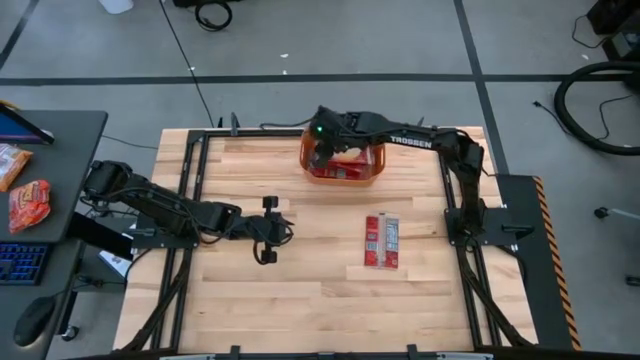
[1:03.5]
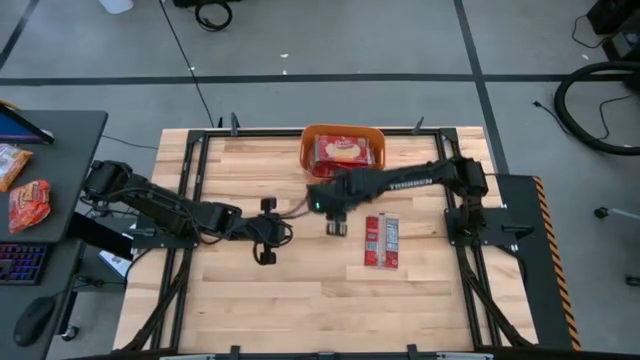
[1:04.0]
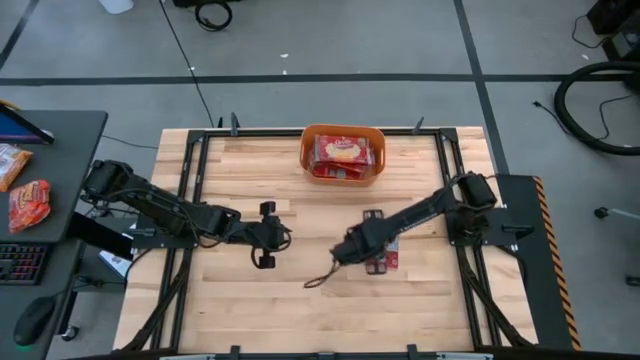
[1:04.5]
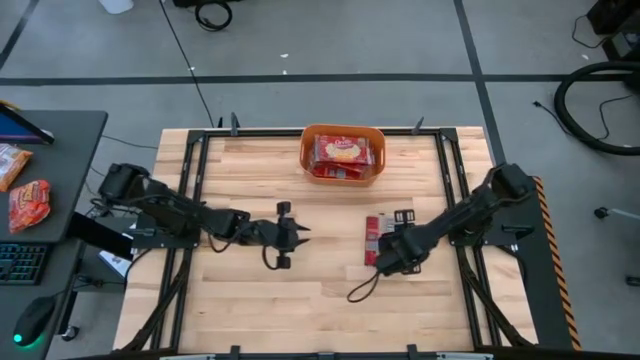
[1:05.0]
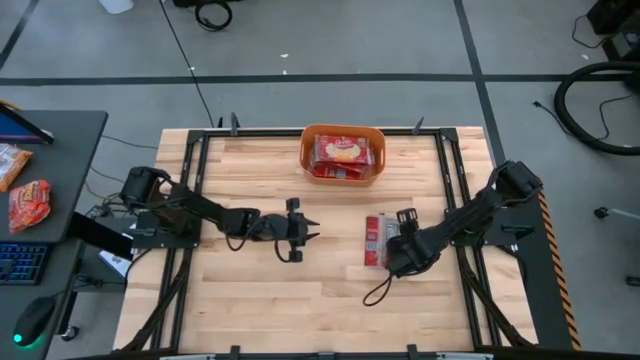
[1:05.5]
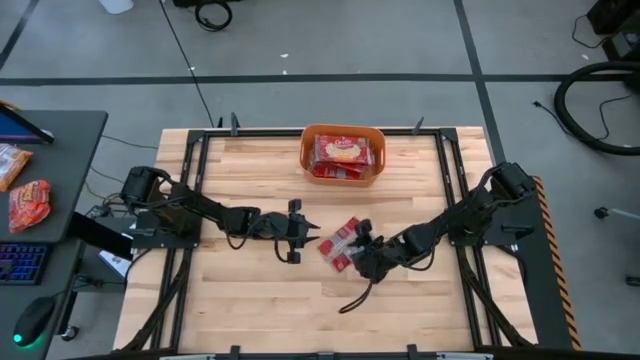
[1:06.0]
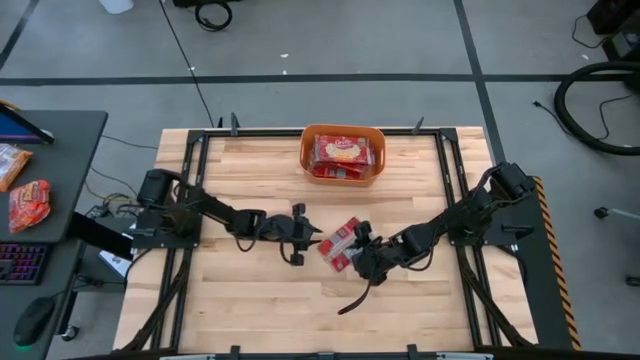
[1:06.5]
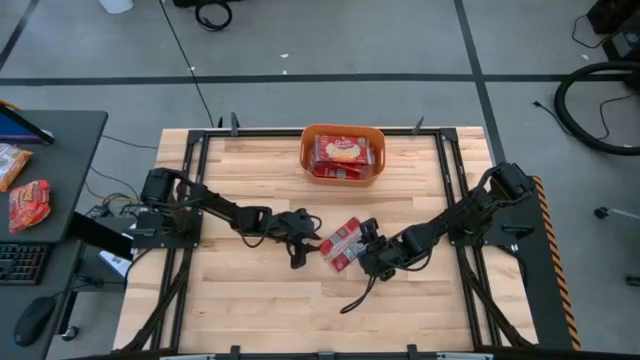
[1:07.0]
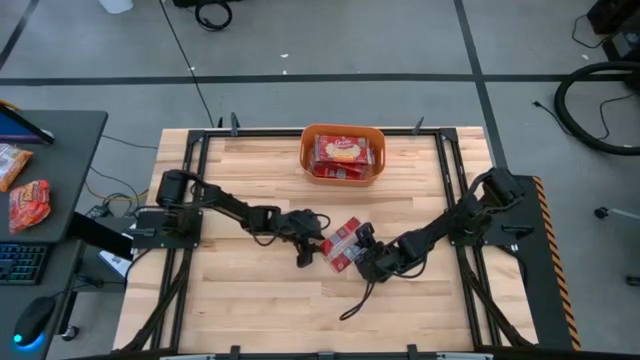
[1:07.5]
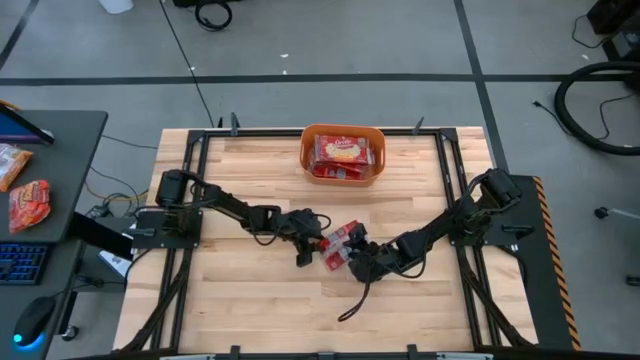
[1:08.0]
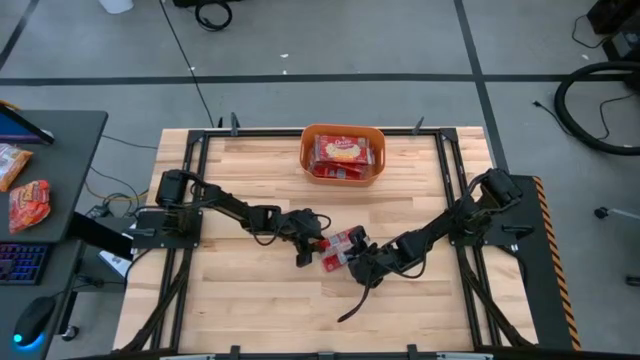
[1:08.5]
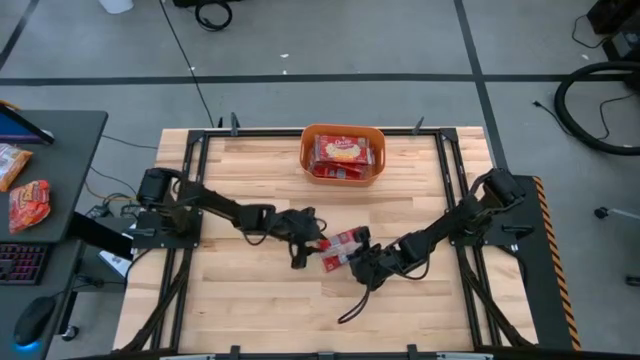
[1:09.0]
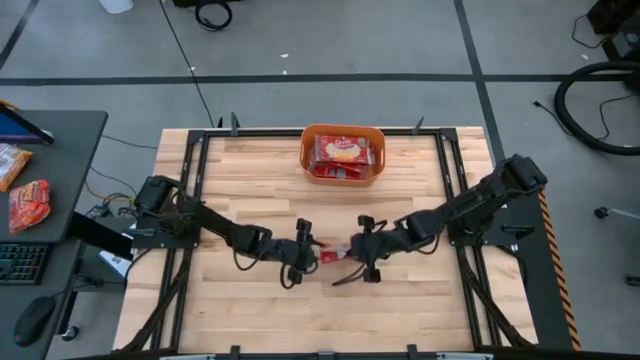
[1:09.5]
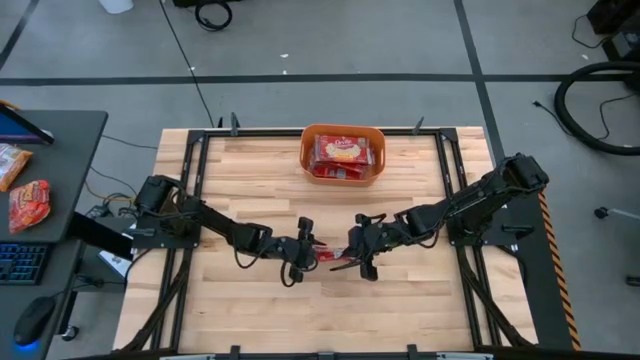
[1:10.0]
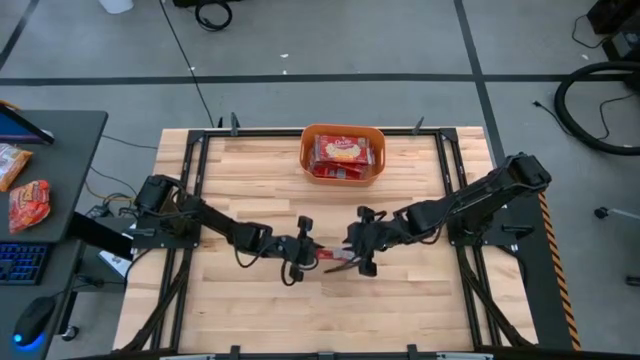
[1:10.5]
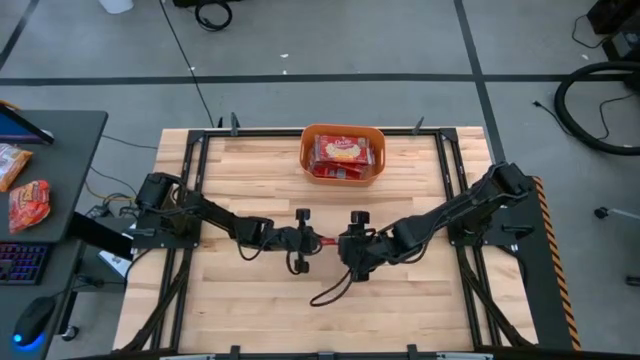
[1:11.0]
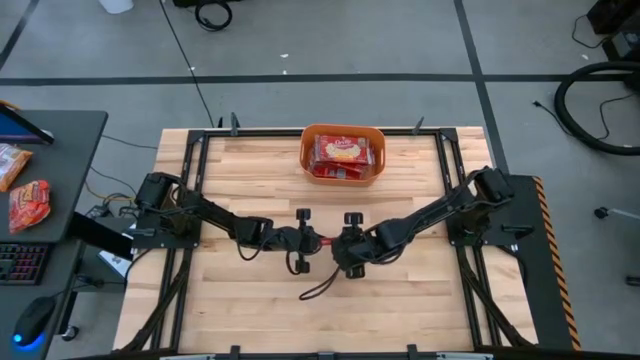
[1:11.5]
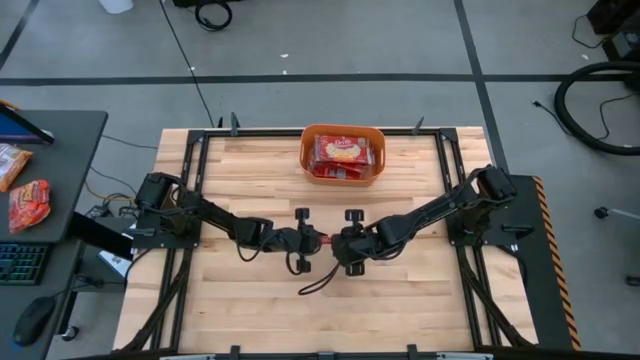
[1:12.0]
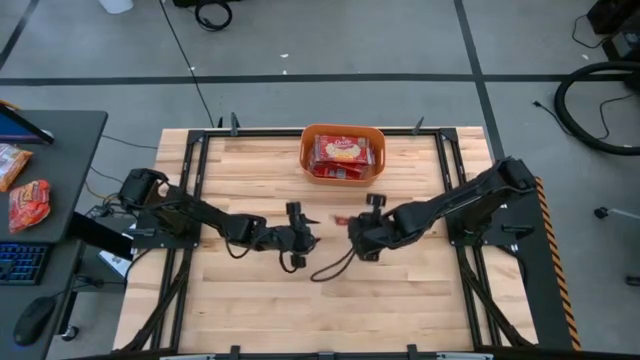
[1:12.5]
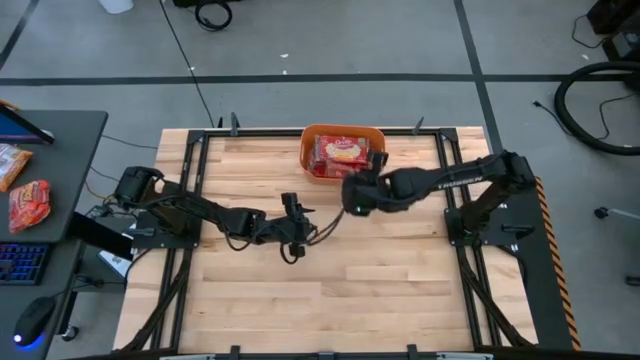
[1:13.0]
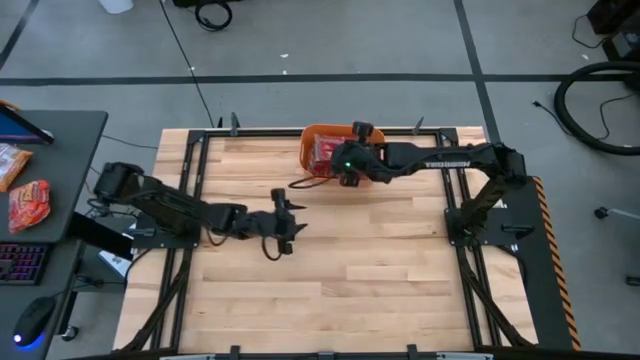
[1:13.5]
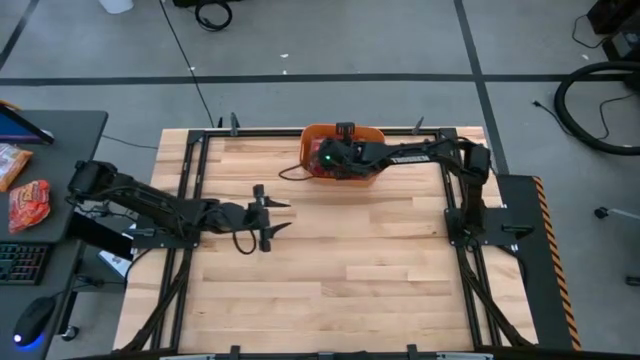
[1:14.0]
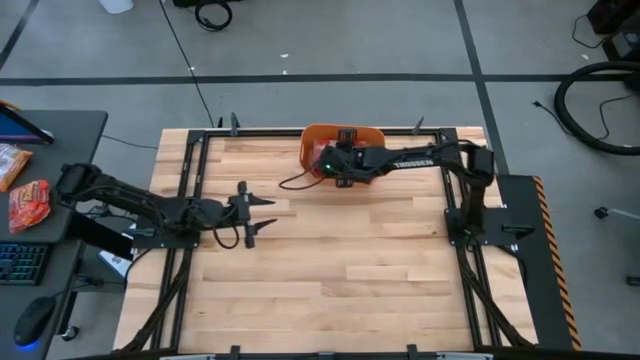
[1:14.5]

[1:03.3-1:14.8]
Task: Sort popcorn bags into baskets
Put the red popcorn bag into the orange bin

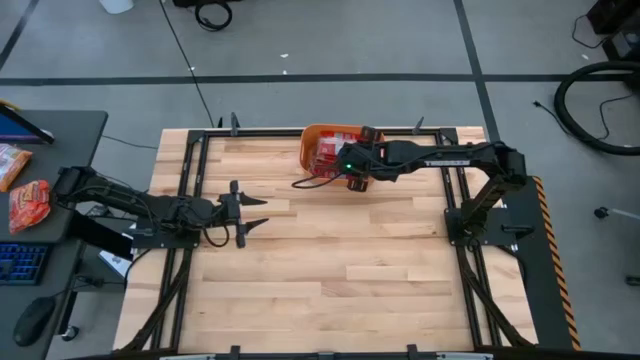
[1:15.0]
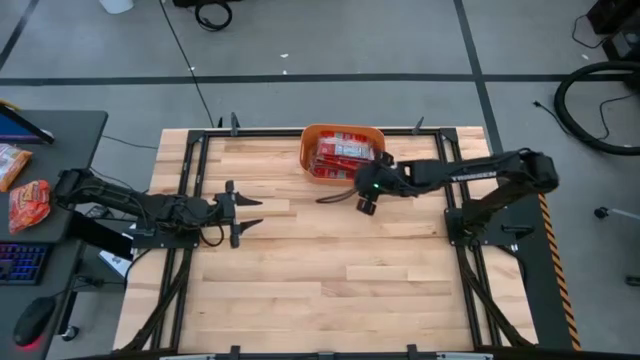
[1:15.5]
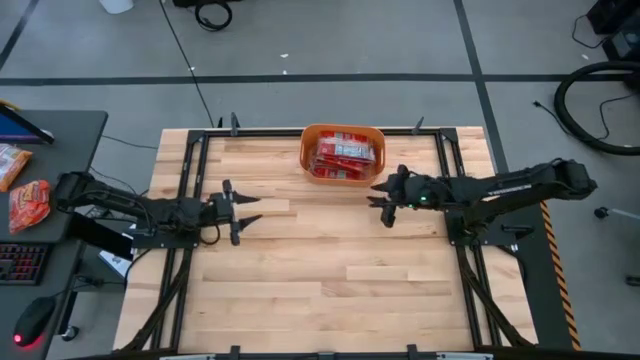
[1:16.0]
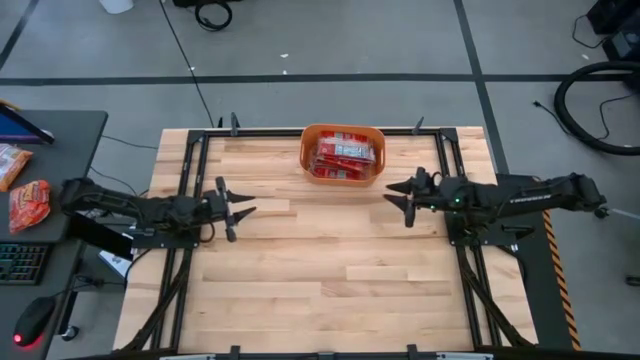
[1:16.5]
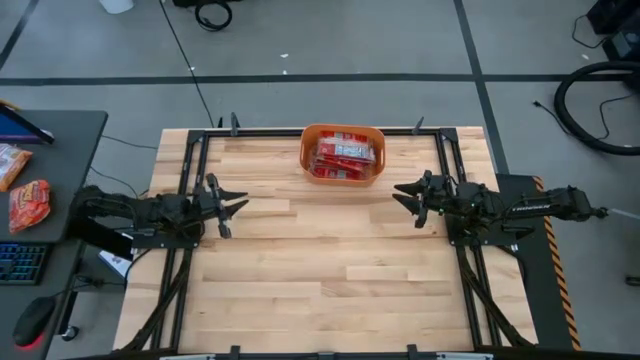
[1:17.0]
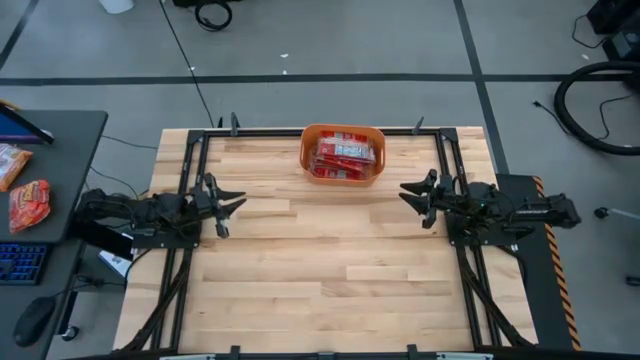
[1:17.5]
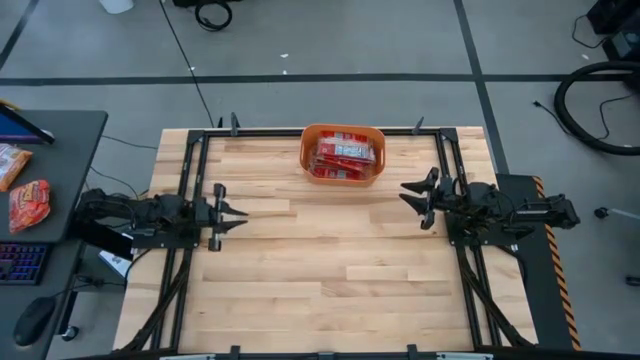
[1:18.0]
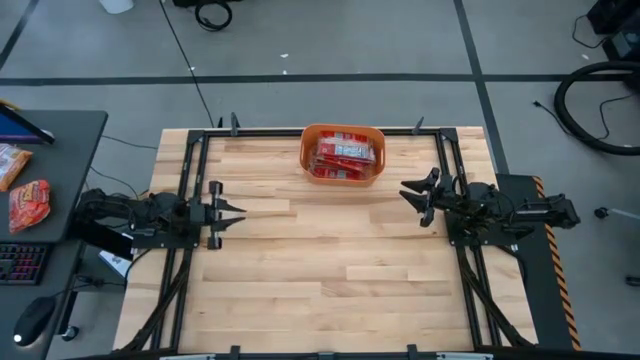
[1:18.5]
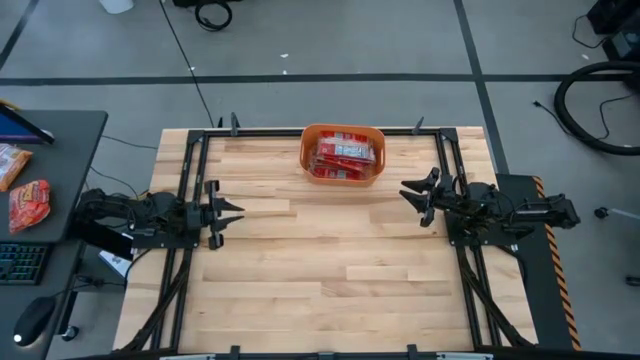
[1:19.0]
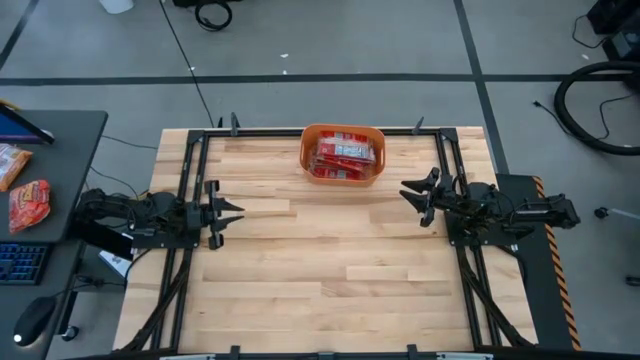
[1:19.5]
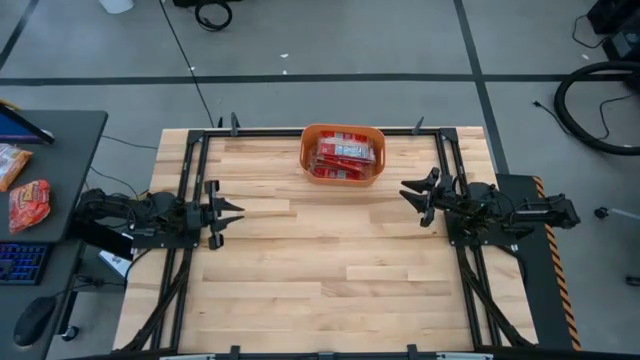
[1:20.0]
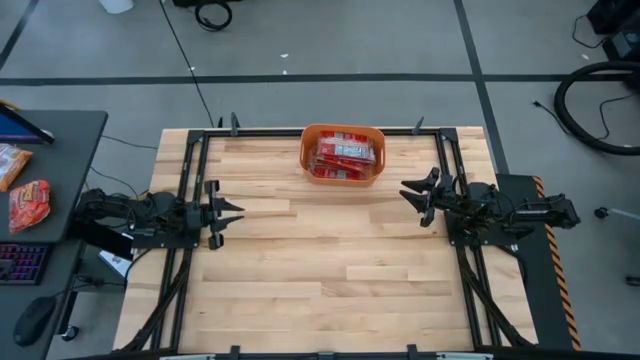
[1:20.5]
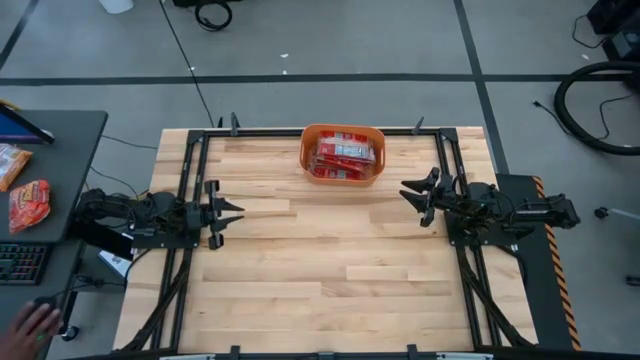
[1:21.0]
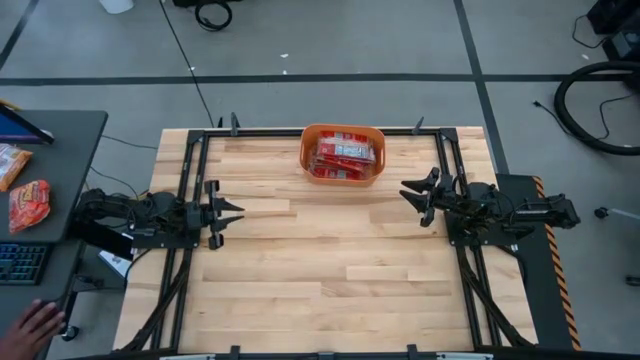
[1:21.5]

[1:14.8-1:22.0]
Return to Home Position

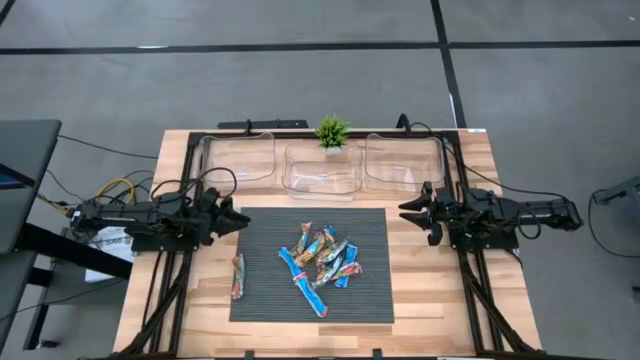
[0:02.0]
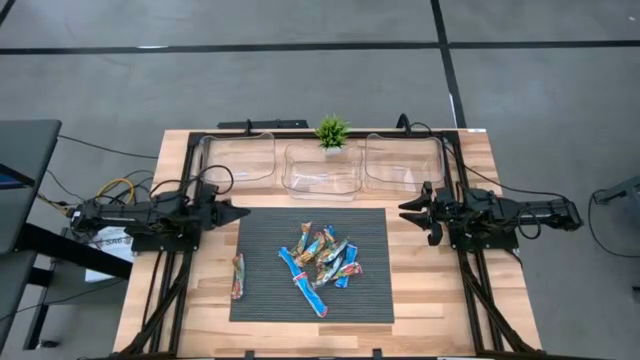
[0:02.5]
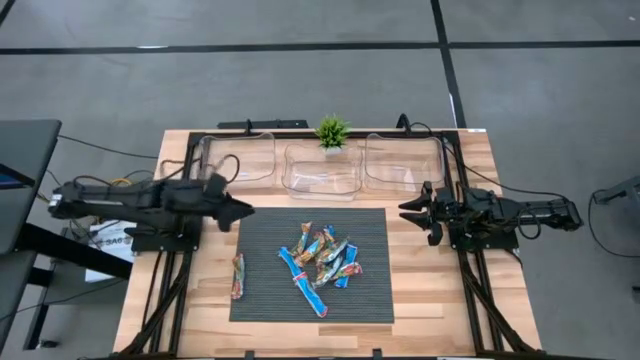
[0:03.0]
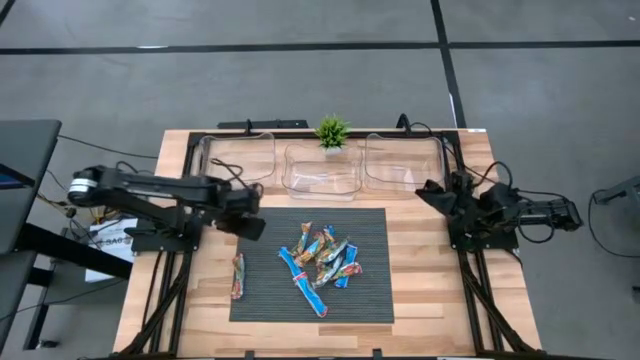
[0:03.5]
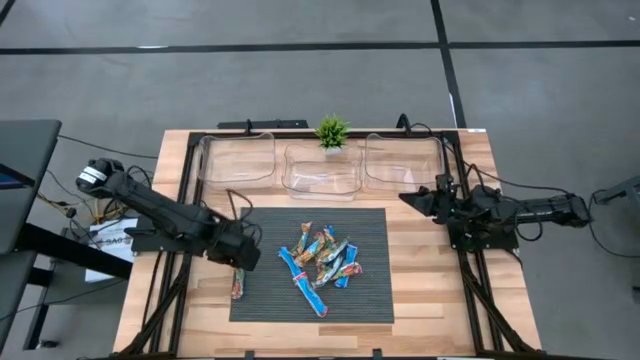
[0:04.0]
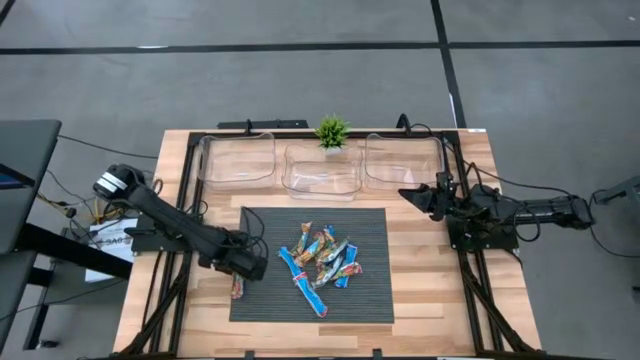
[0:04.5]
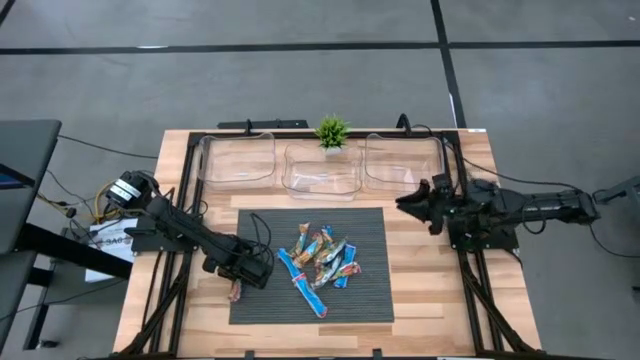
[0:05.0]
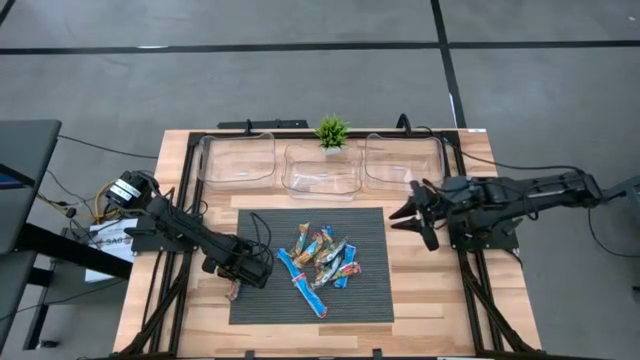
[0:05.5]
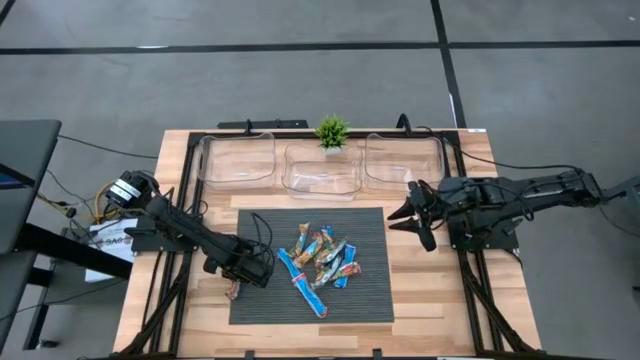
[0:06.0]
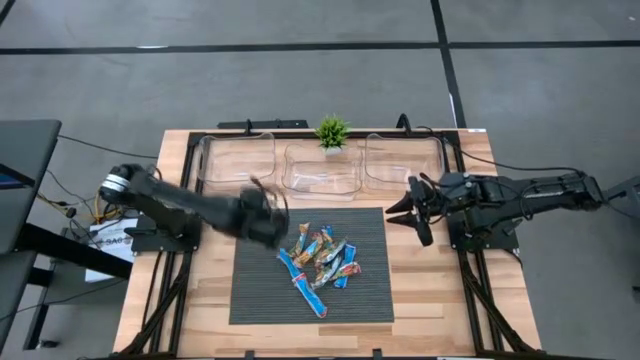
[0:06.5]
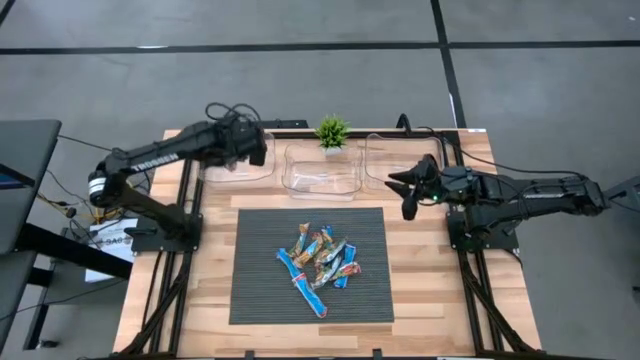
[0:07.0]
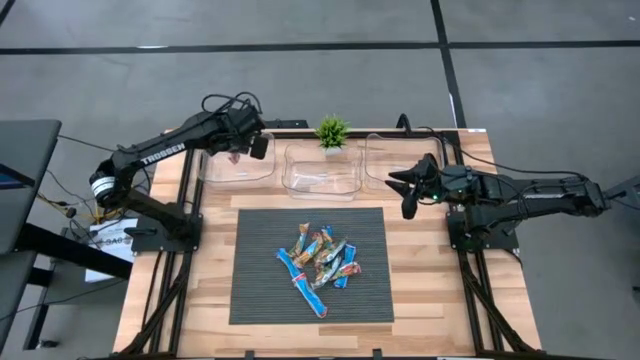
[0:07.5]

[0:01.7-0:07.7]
Task: Pick and place Granola Bars by type
Put the red granola bar into the top left transparent bin
